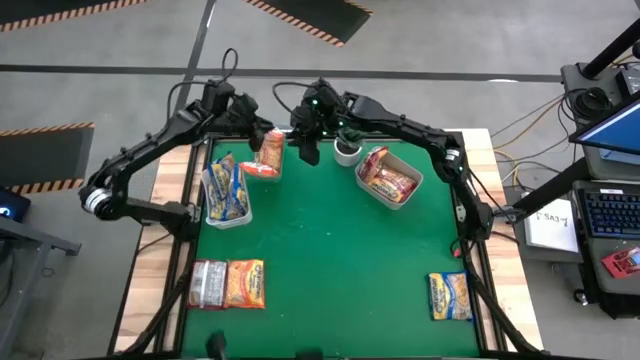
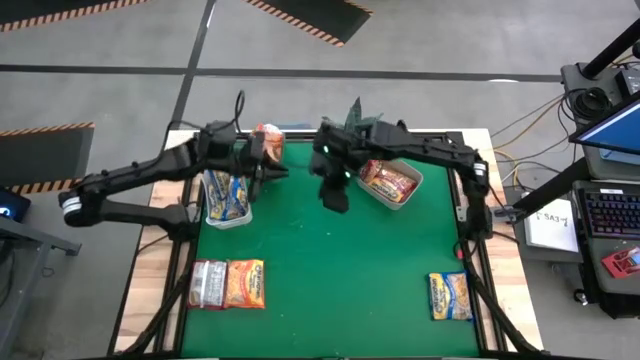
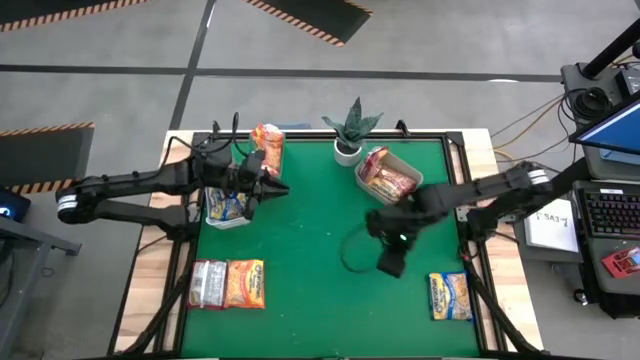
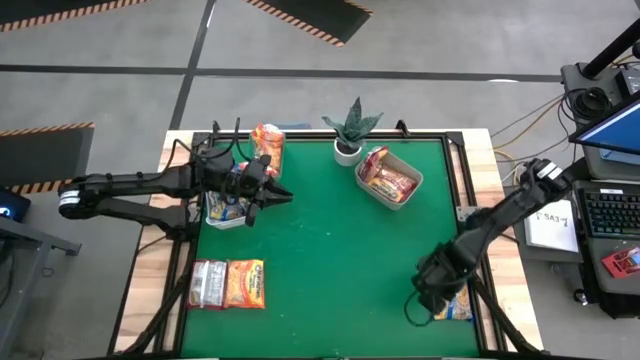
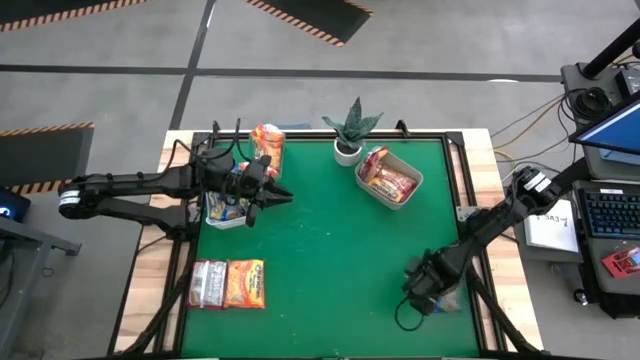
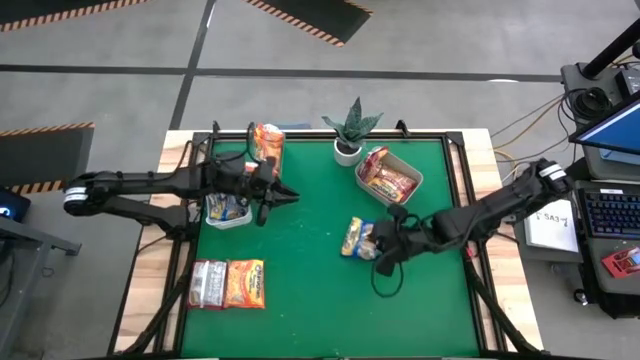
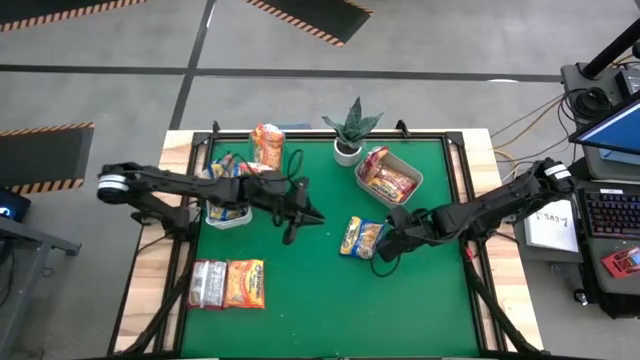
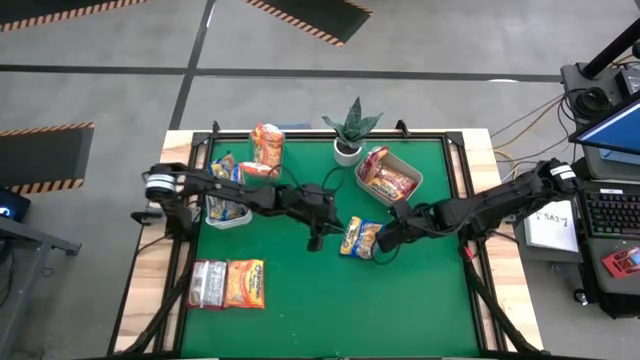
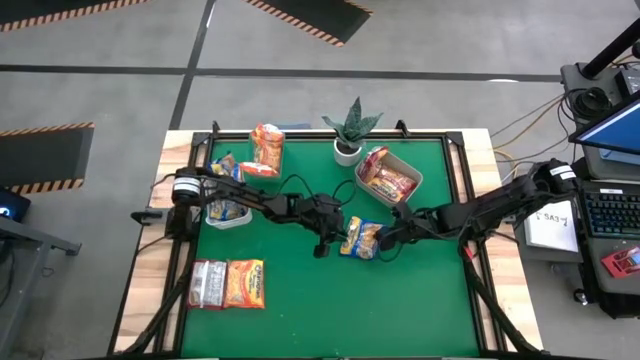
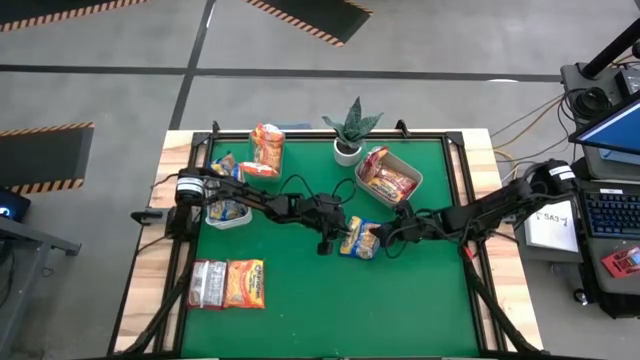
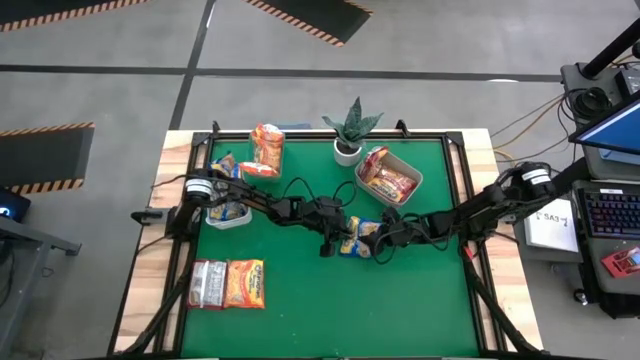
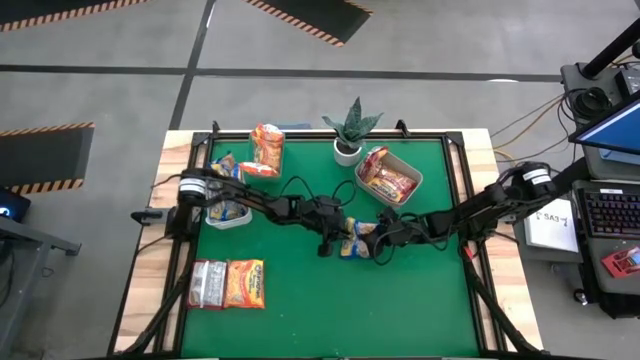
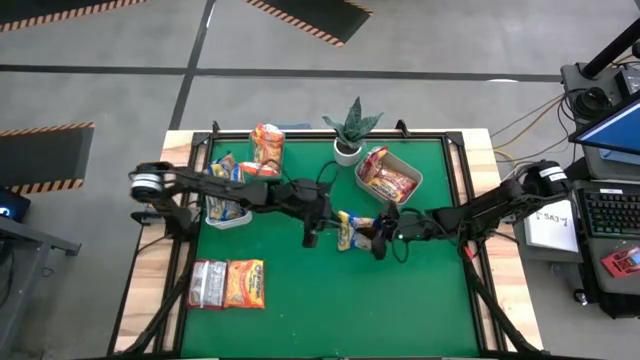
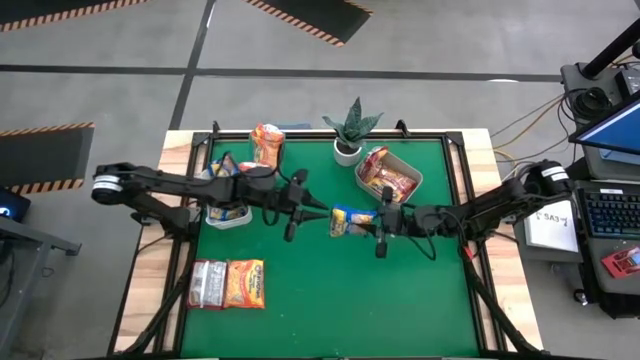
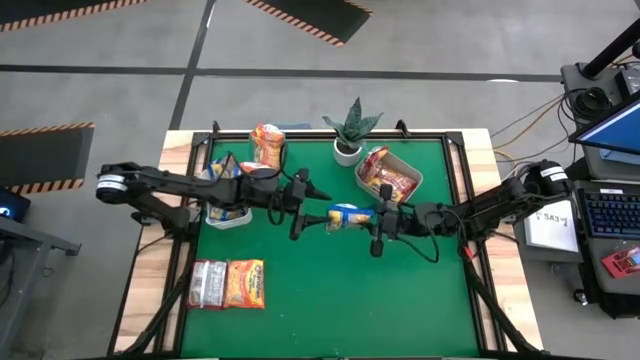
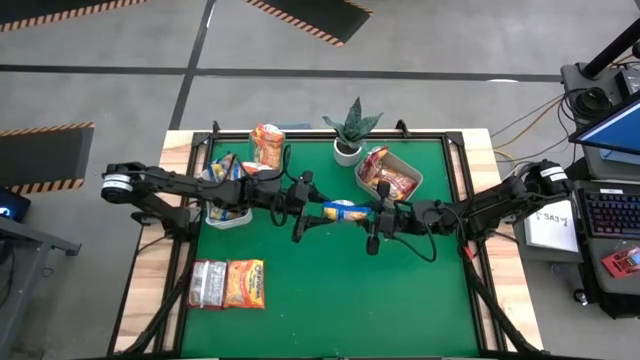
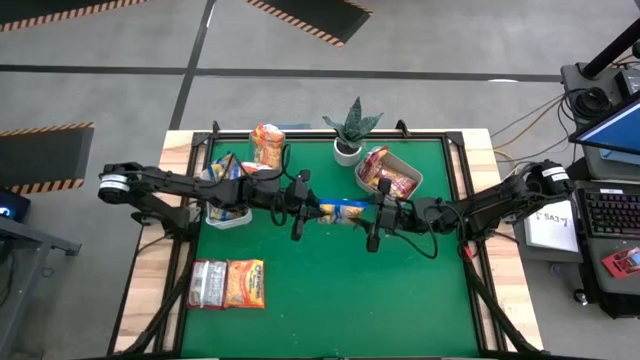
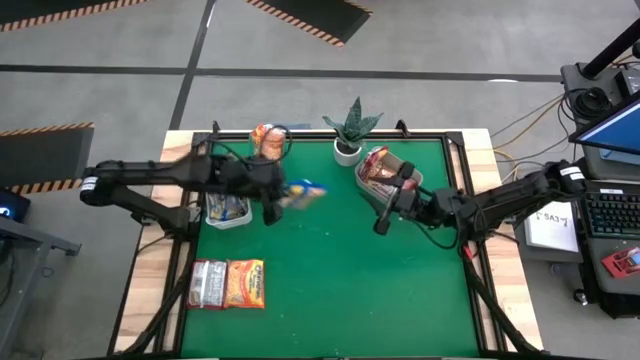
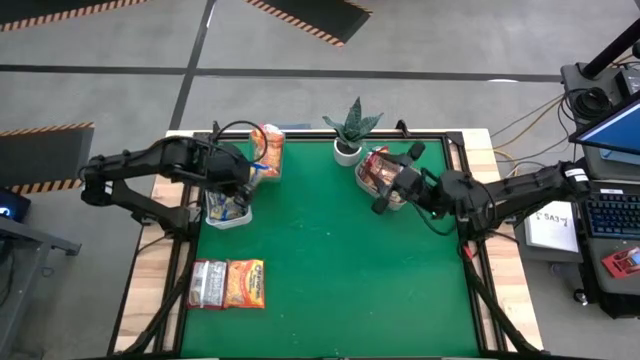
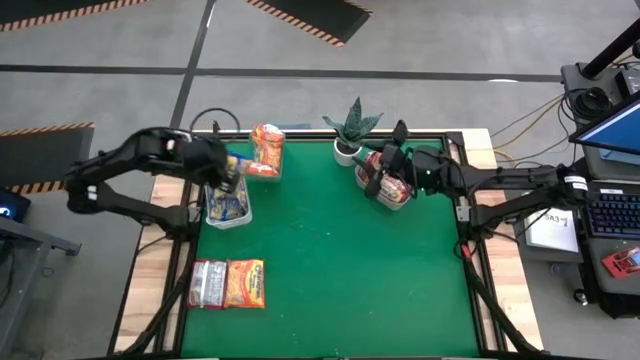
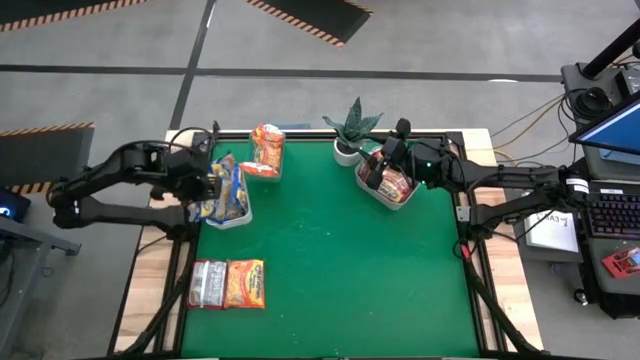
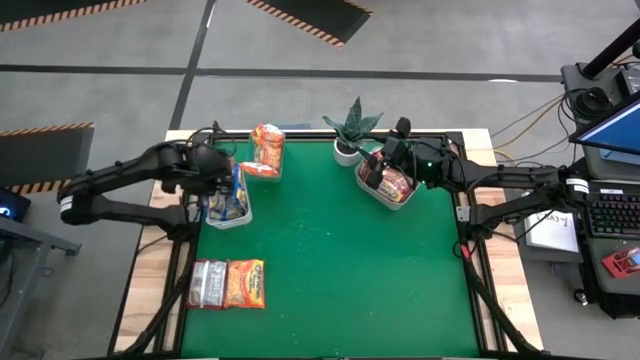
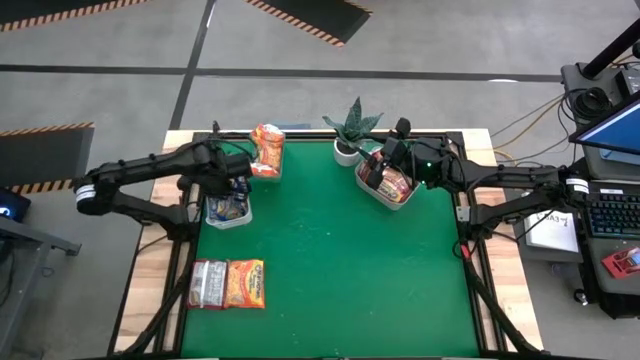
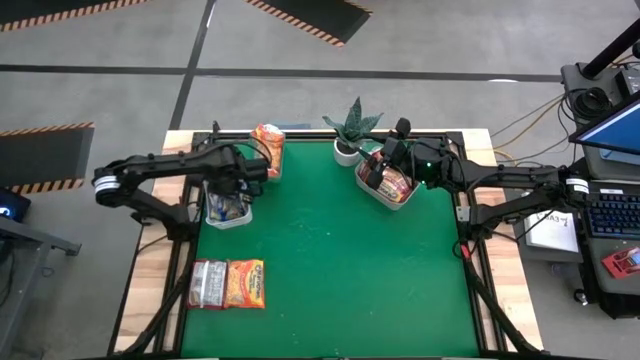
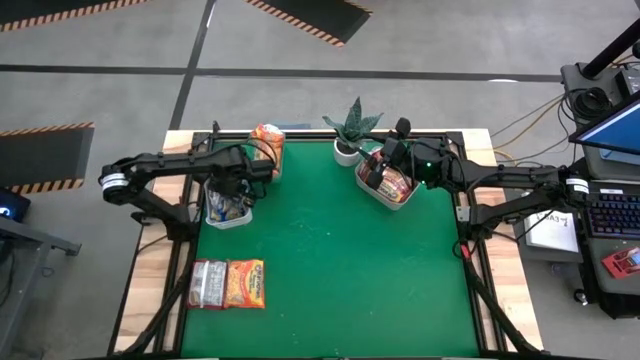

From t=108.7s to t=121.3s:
Task: Sort Maruchan noodles
Put the blue noodle pack into the white bin

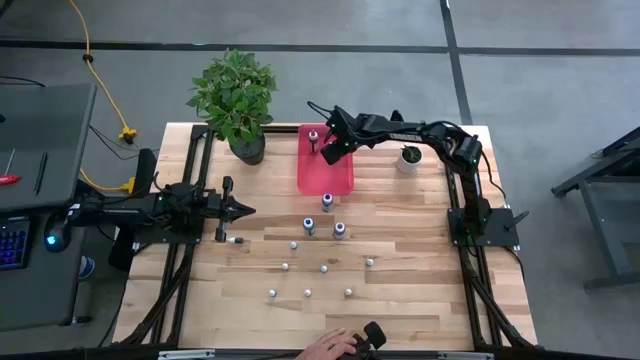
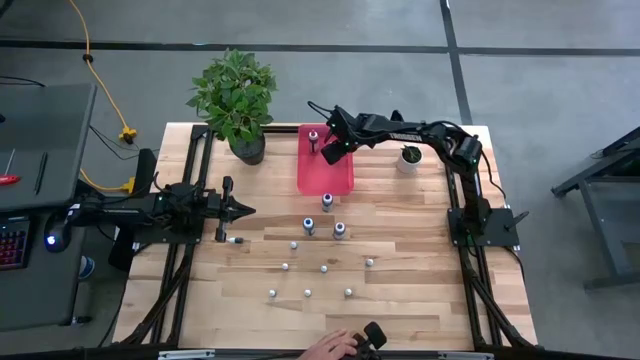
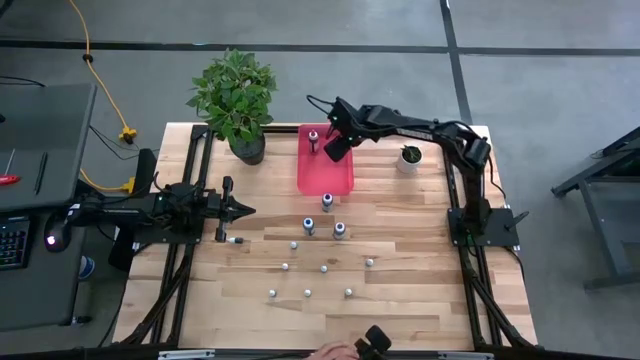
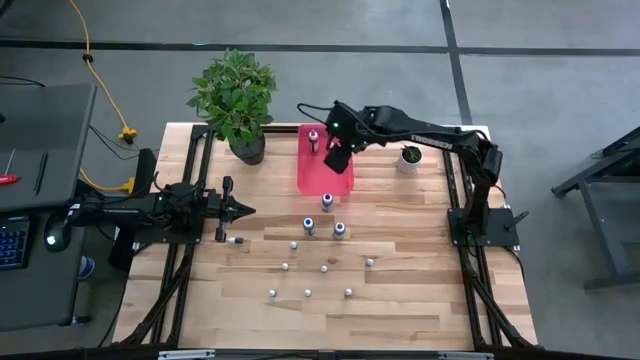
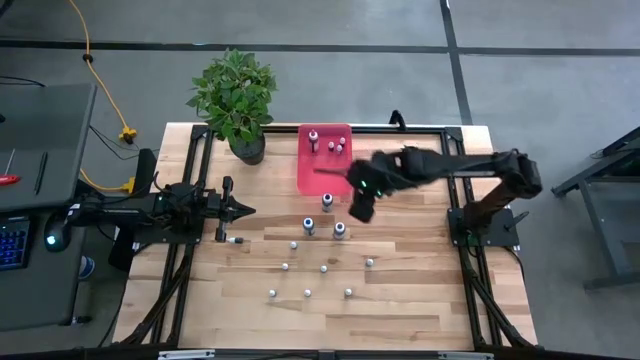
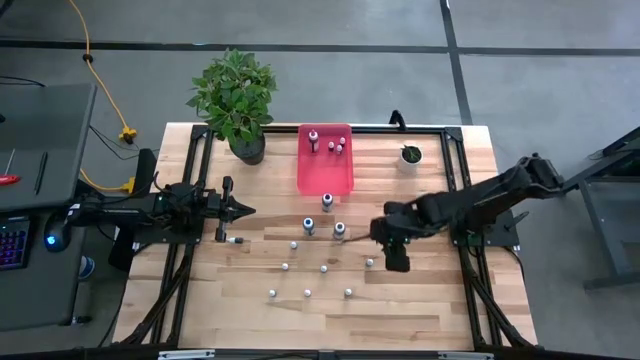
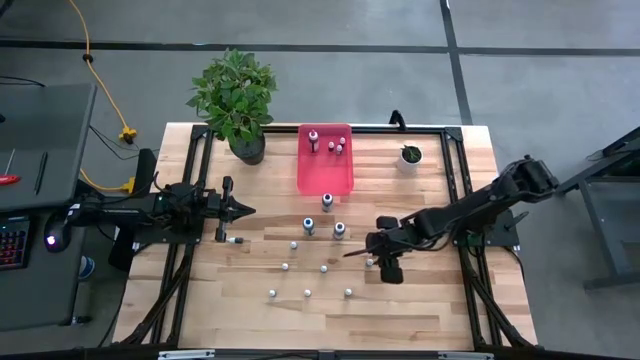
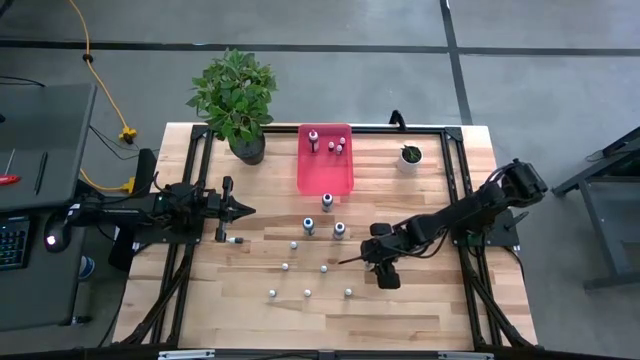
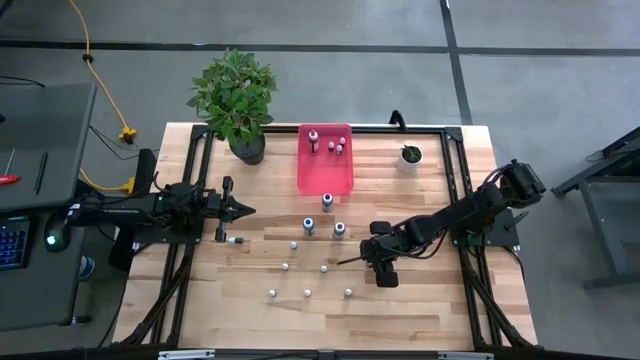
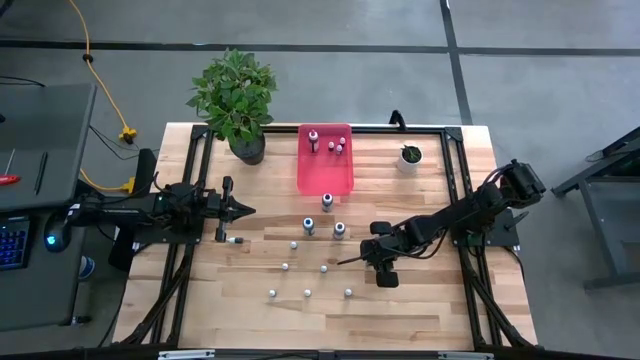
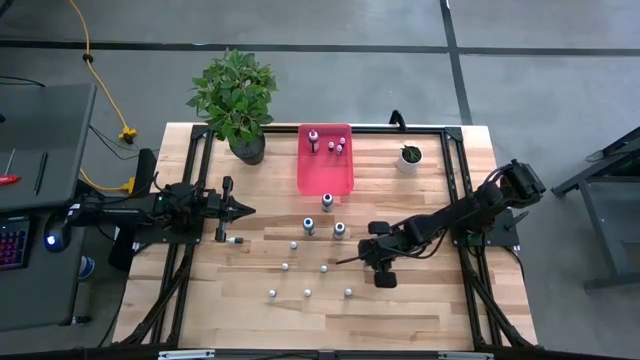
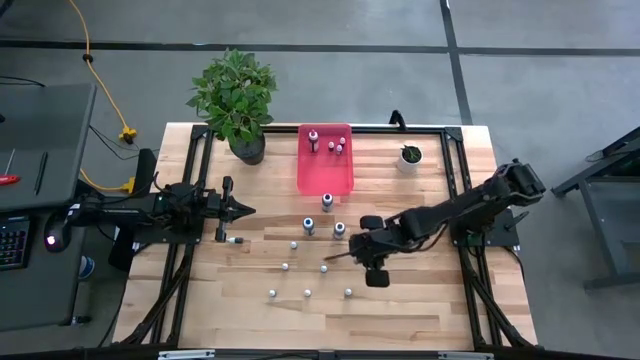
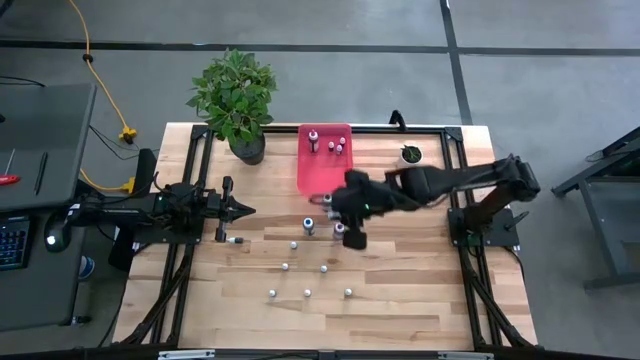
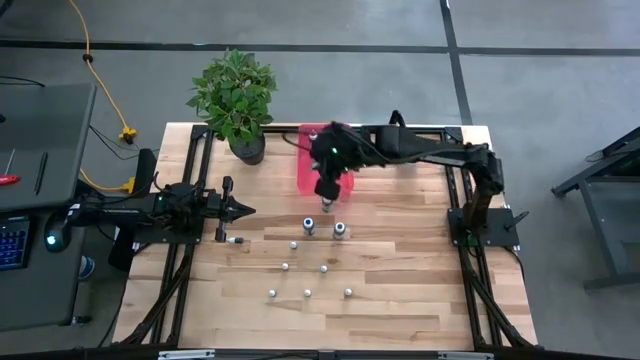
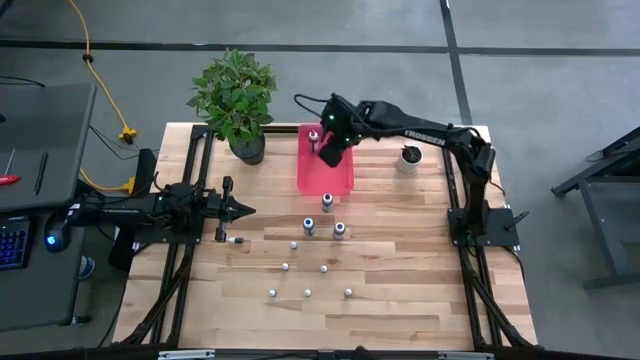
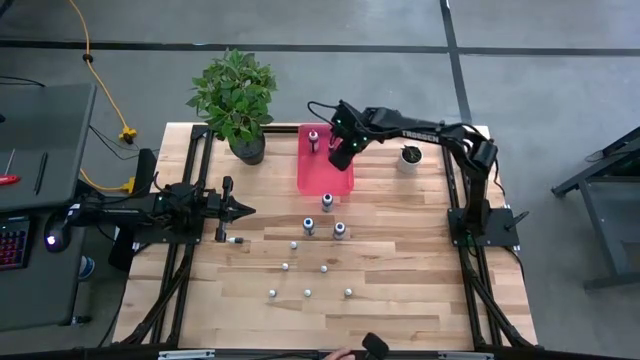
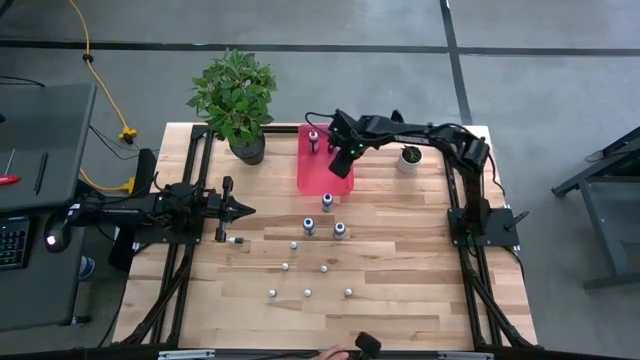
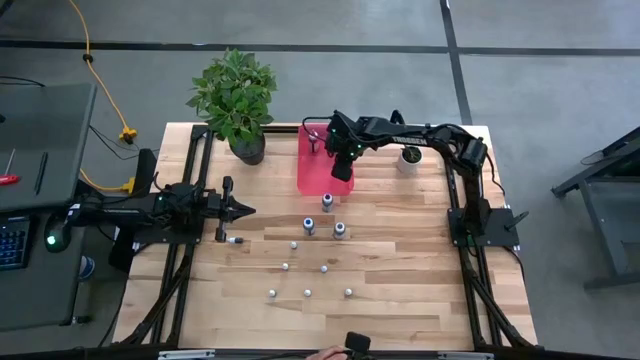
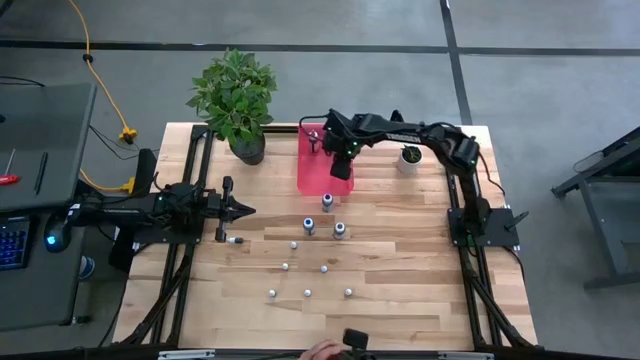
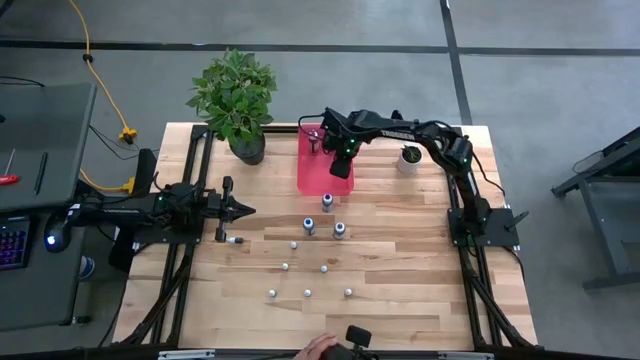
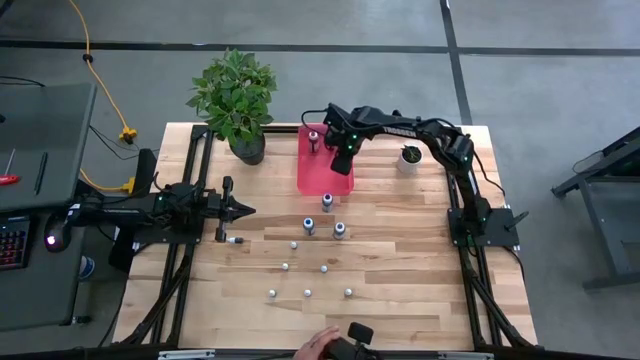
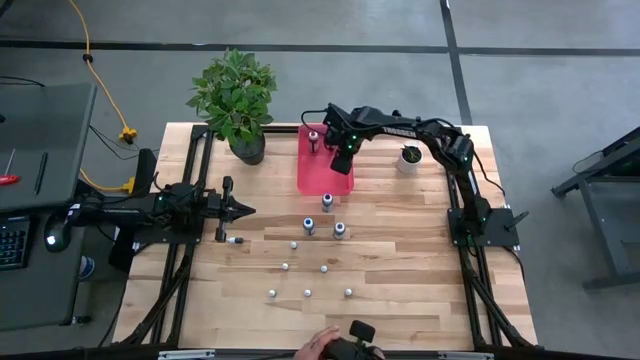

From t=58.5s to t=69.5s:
Task: Pick & Place food coloring
Put the blue food coloring bottle into the pink bin
